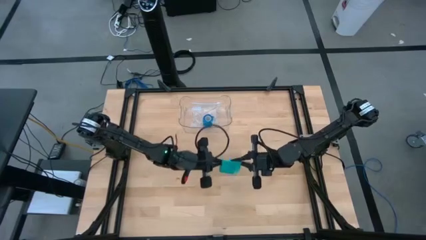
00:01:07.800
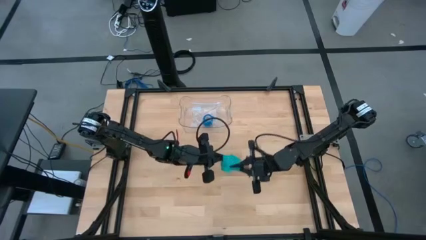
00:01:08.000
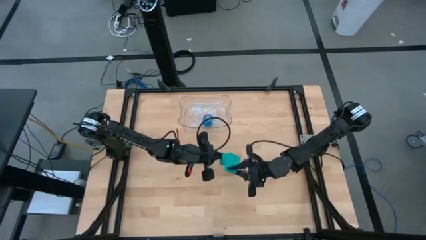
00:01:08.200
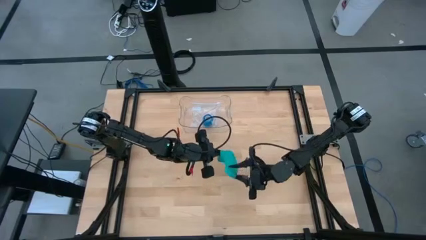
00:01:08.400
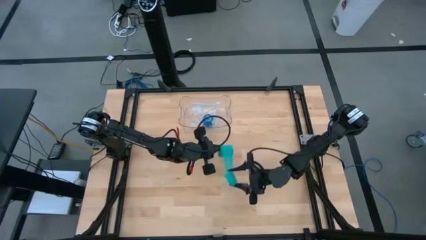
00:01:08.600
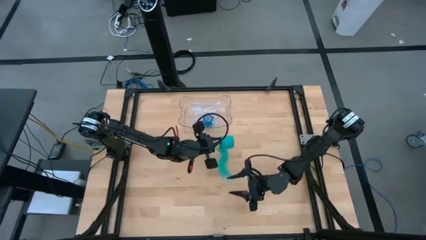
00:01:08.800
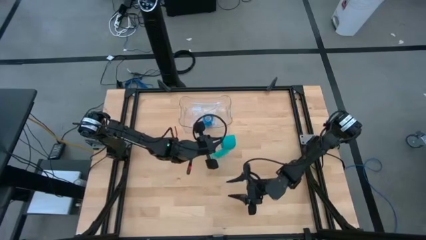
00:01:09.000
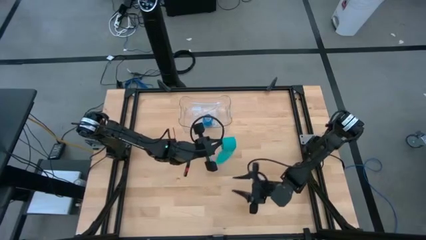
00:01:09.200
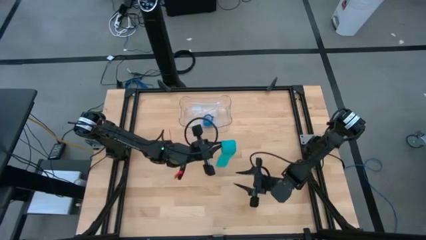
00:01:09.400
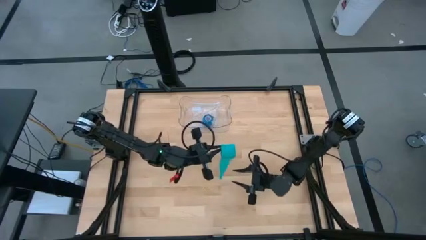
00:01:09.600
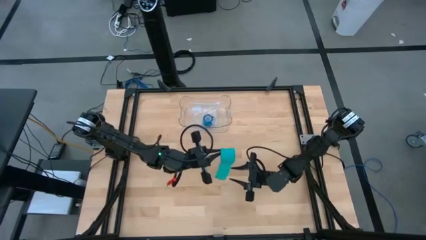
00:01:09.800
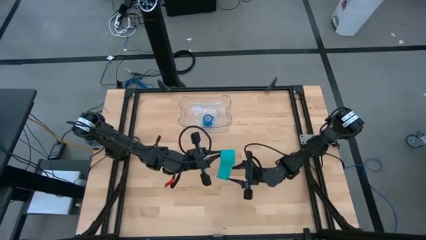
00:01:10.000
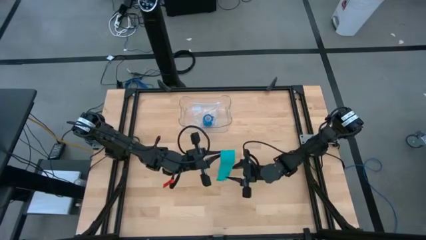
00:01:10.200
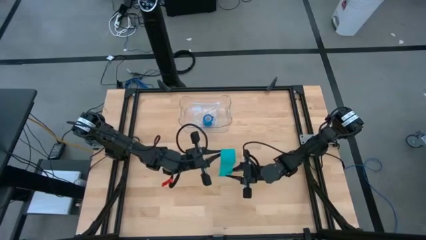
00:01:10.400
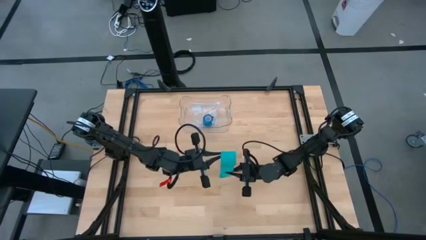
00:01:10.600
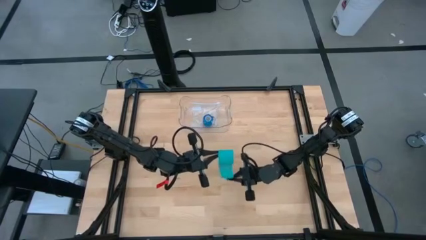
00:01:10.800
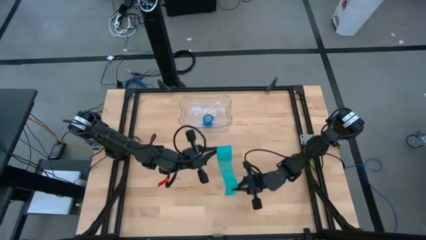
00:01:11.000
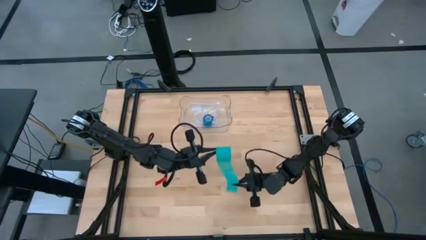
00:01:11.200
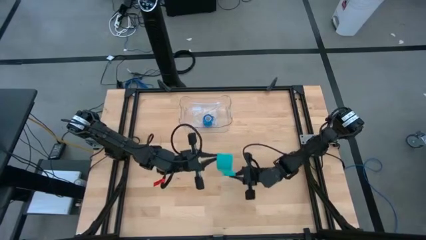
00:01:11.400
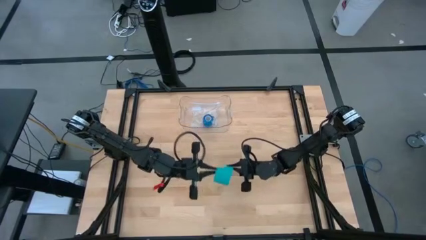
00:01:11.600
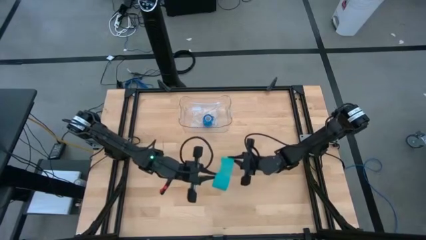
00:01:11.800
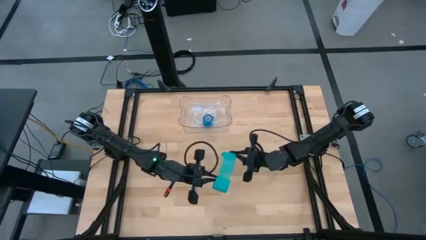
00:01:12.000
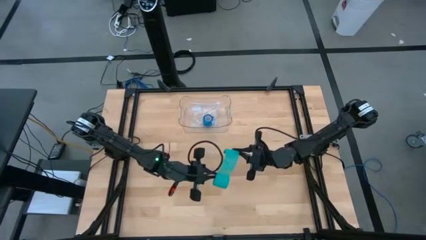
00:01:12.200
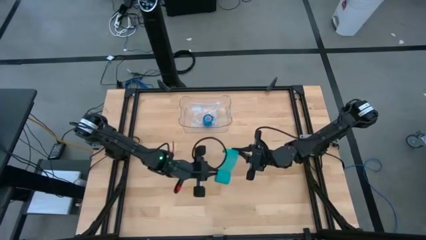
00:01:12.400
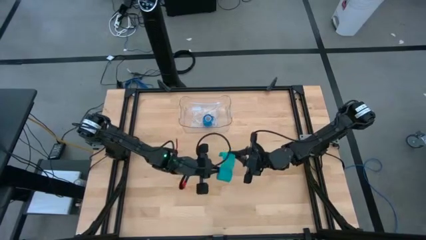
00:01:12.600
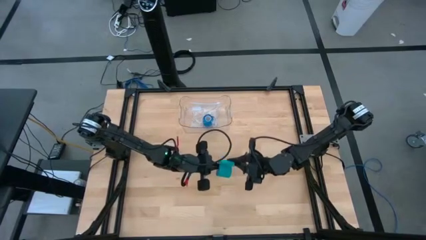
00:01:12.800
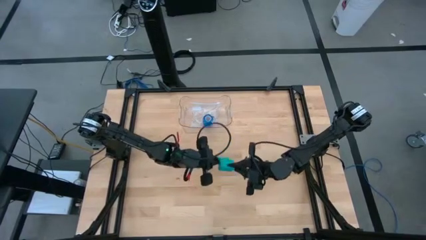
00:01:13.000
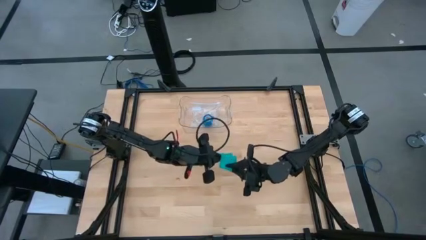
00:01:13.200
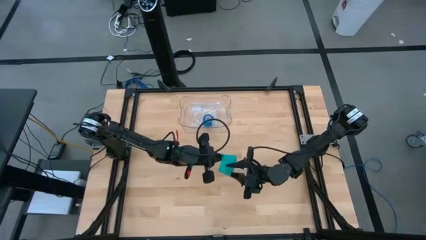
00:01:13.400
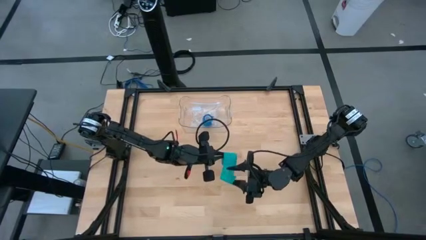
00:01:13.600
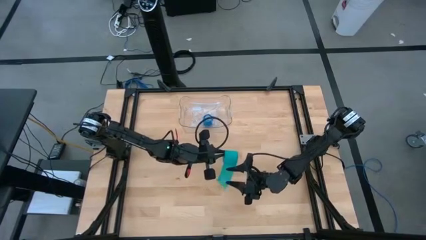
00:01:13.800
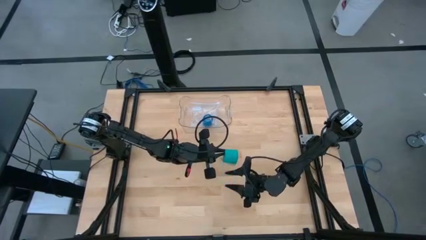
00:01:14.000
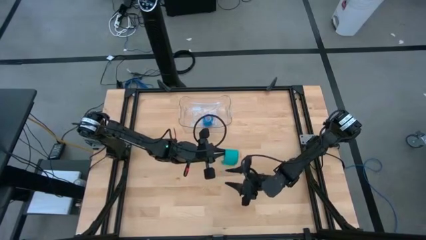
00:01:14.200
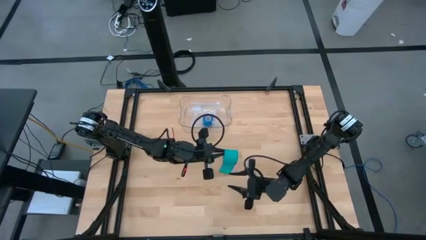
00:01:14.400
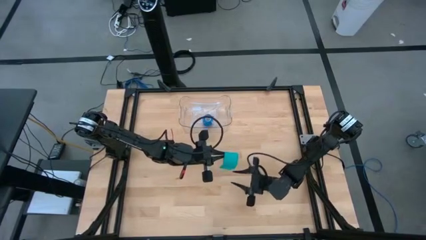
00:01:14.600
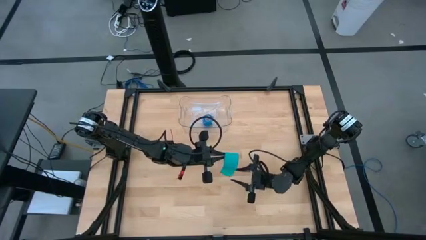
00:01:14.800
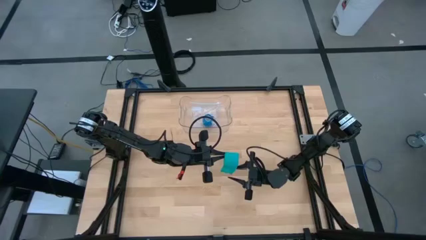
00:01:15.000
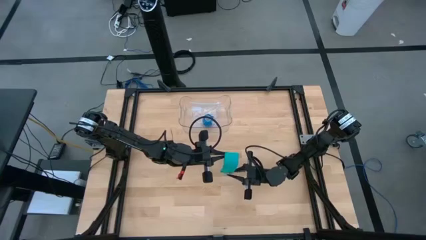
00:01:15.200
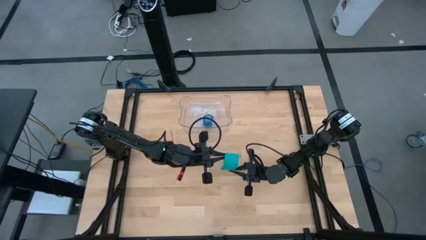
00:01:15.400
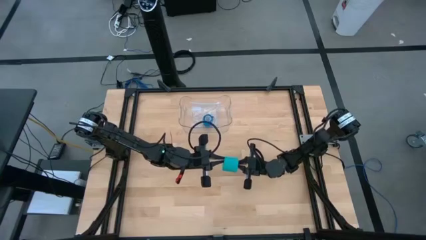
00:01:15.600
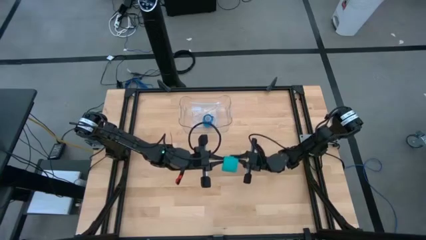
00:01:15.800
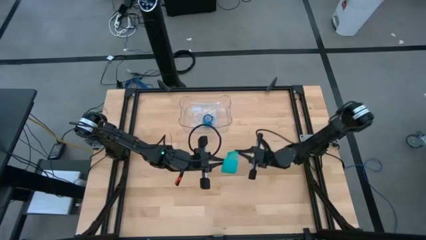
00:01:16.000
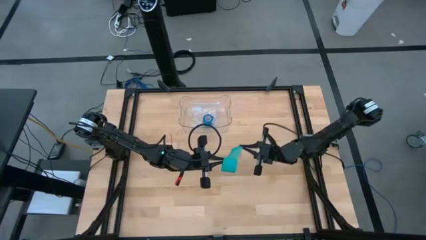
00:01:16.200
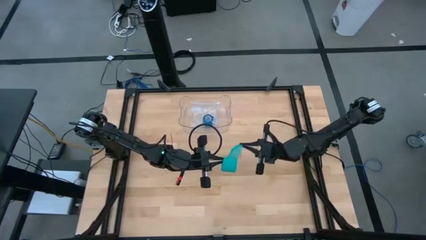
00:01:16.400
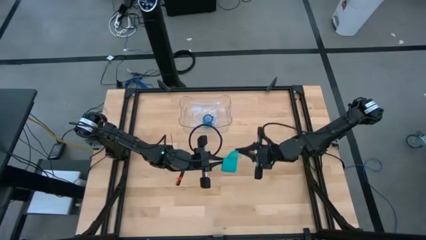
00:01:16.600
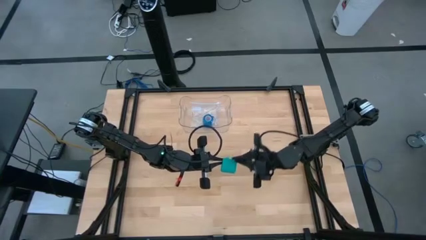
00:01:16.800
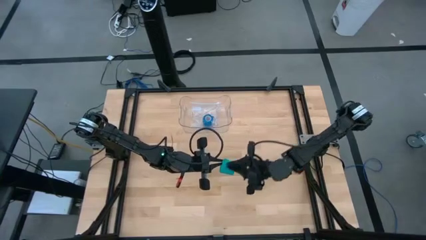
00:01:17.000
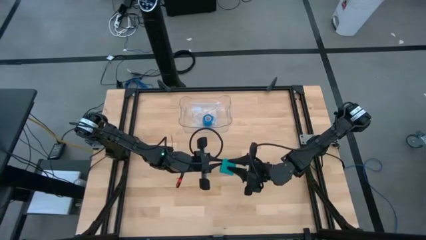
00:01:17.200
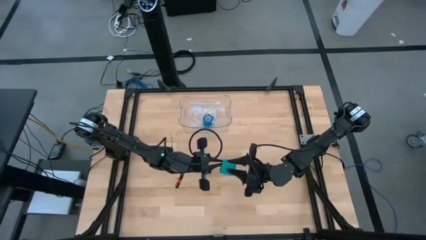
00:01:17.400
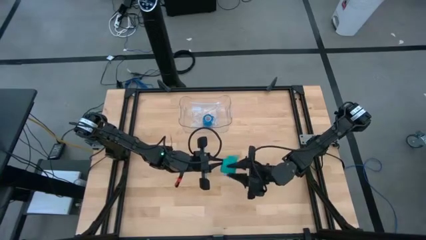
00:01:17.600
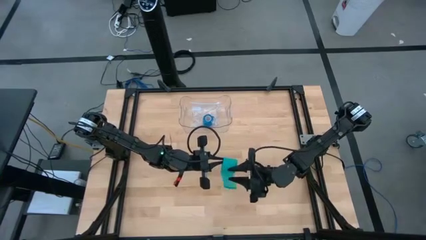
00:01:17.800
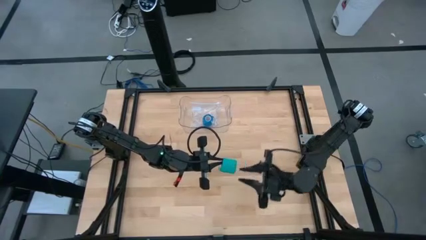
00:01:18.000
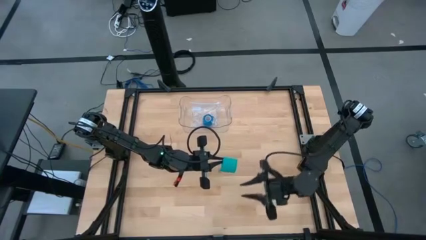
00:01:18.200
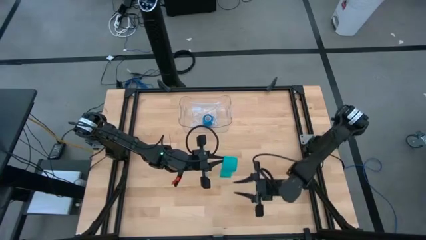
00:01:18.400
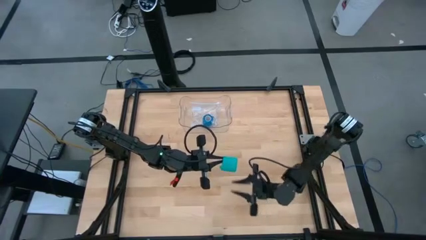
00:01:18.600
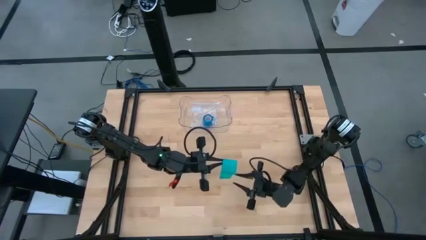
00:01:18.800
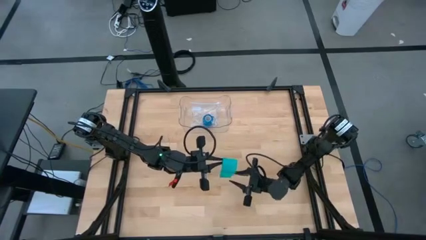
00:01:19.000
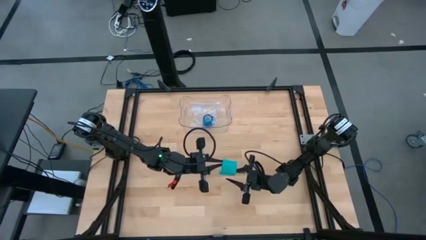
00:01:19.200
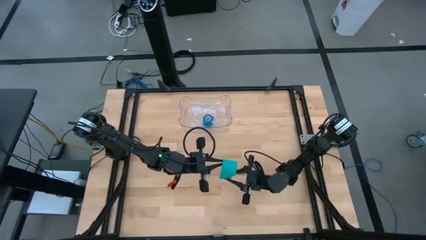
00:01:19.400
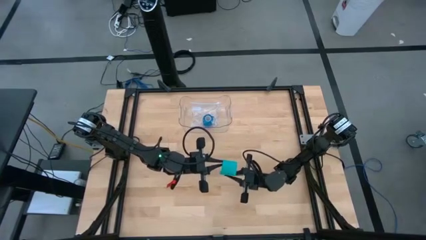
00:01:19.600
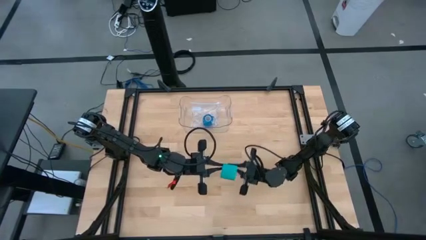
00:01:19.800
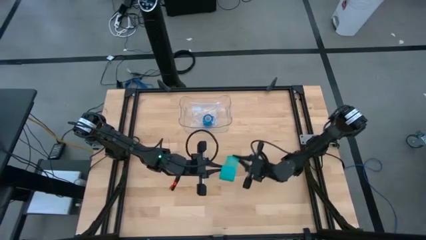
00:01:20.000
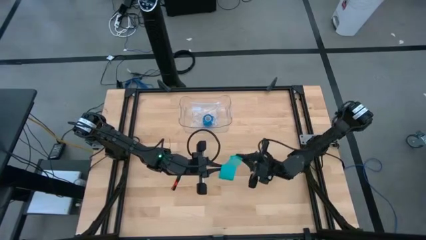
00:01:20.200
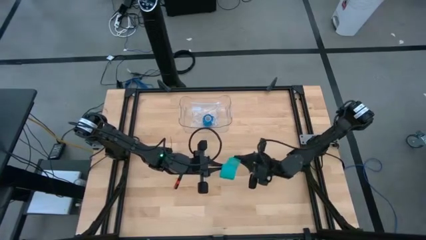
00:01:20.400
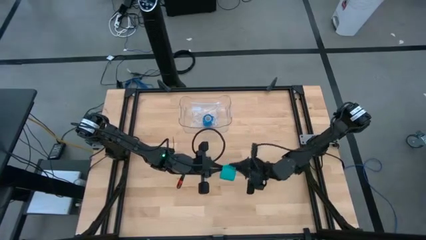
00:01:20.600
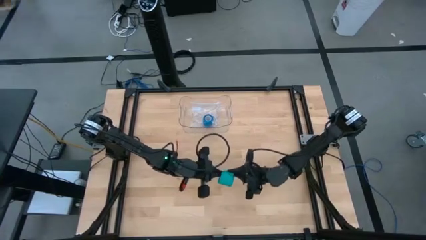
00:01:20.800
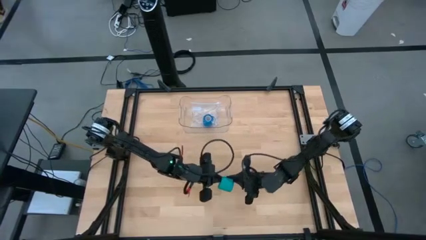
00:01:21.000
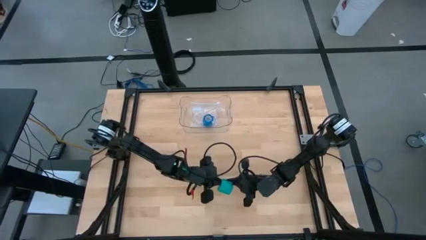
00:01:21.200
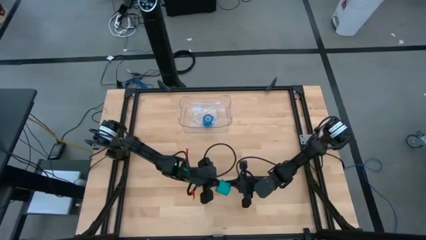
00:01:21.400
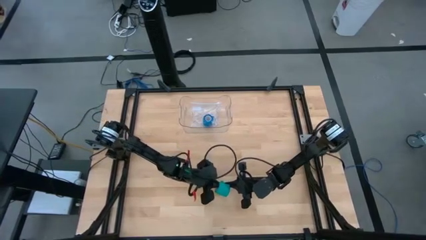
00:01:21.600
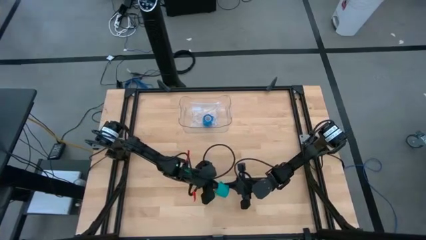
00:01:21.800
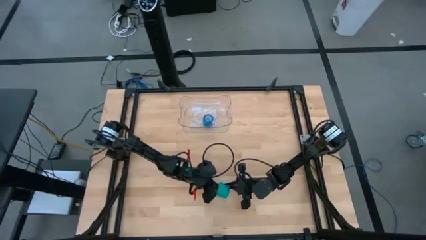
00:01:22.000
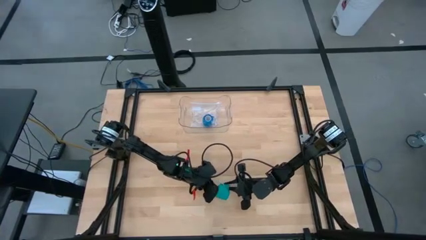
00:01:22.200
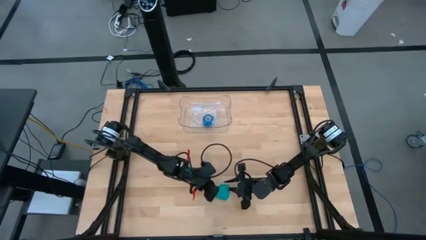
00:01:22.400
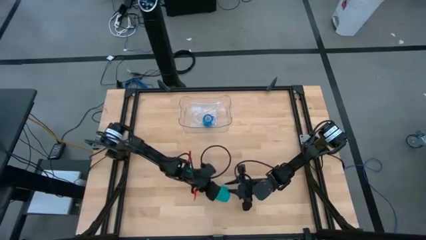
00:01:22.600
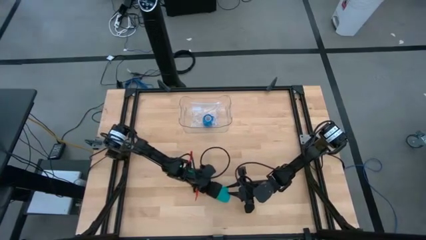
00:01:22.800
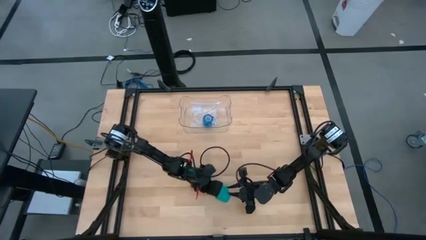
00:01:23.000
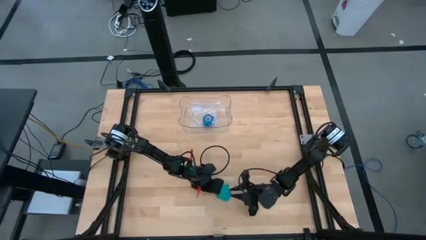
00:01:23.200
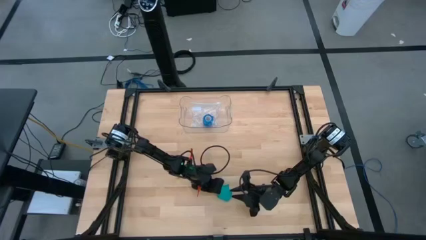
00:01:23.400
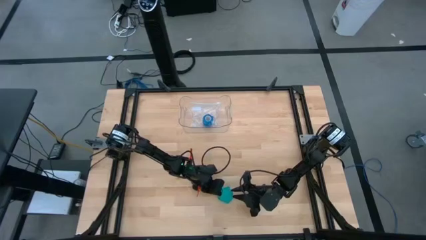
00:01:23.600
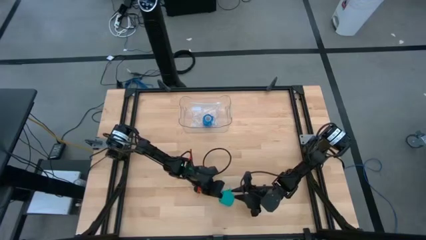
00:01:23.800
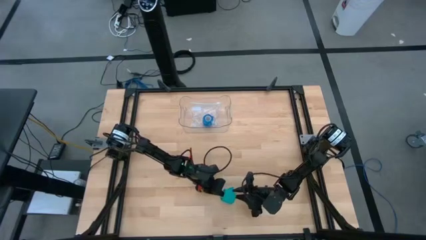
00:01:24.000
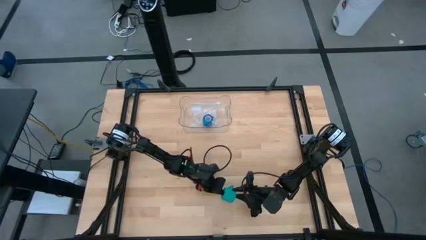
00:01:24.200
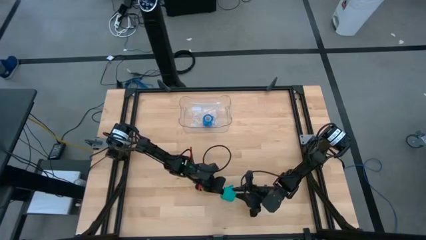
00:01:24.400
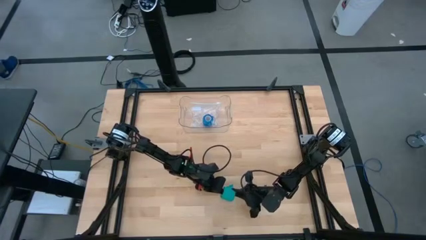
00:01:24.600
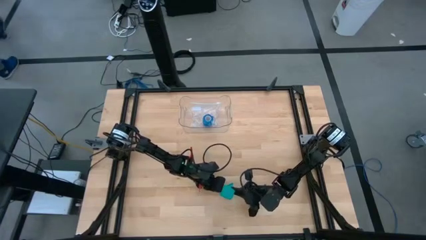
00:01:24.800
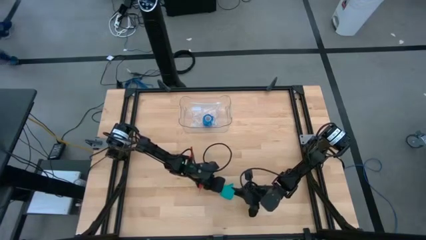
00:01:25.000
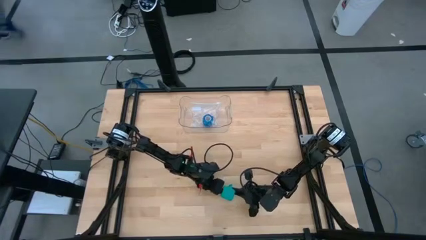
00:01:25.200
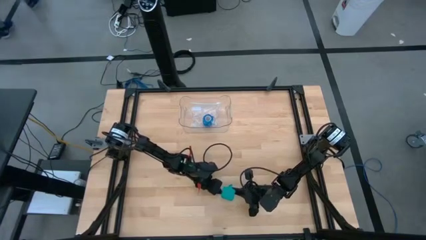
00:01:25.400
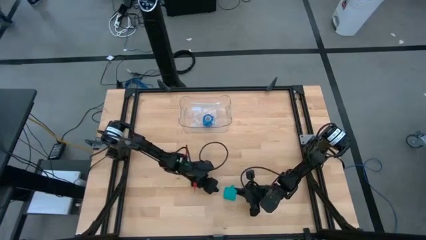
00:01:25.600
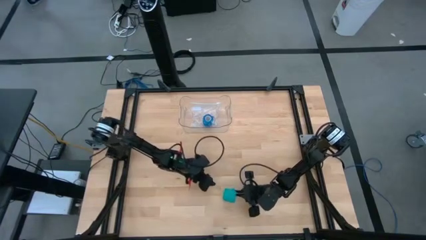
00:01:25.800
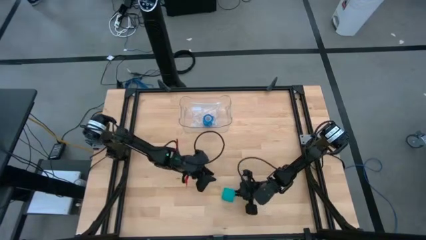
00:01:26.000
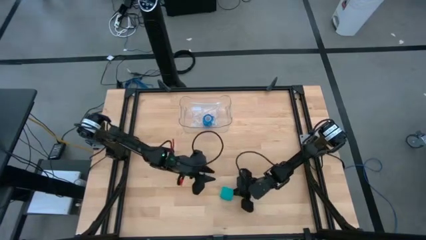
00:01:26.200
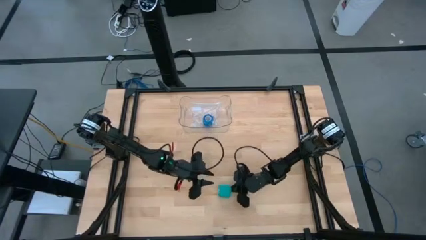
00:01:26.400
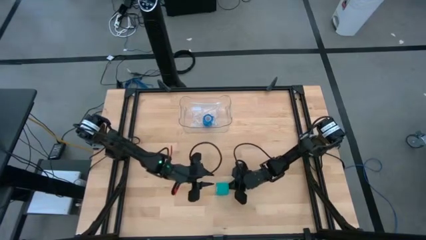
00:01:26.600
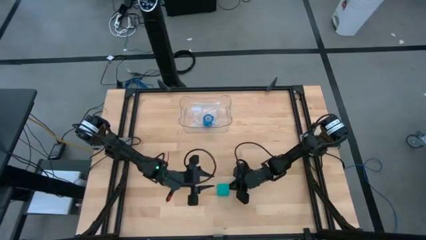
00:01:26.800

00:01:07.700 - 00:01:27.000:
Task: Roll bandage
Roll the green bandage
